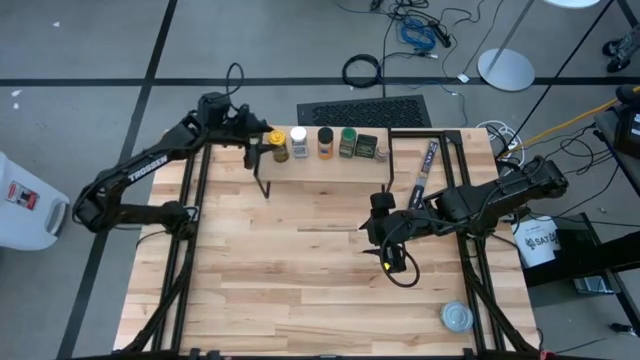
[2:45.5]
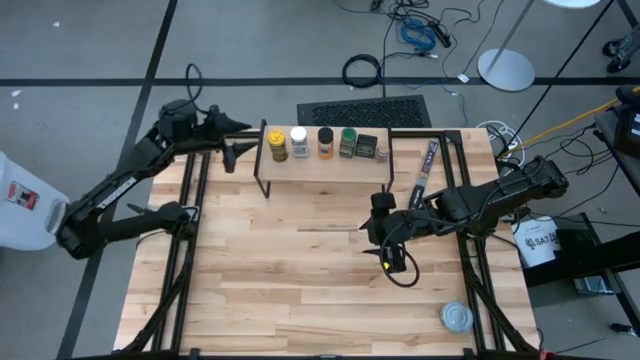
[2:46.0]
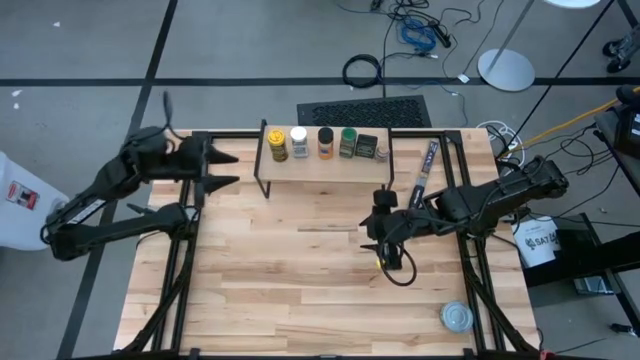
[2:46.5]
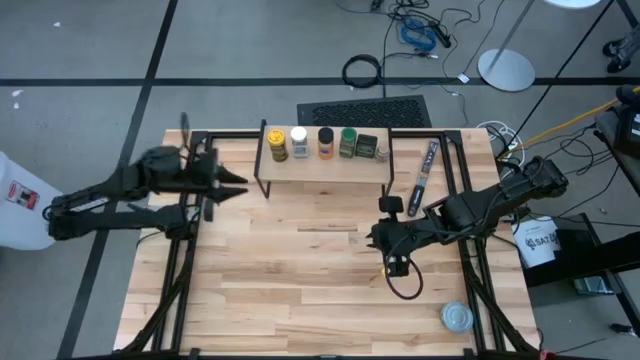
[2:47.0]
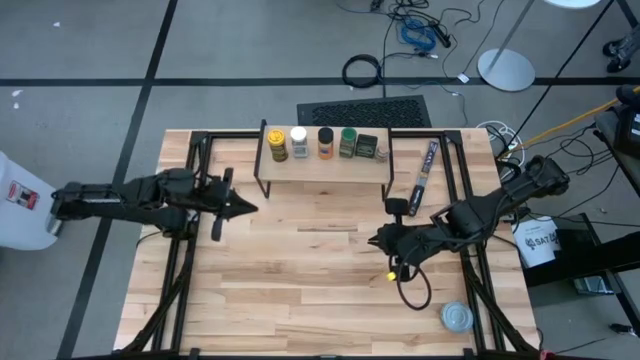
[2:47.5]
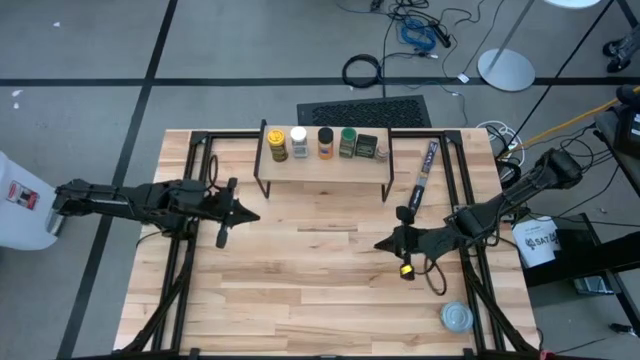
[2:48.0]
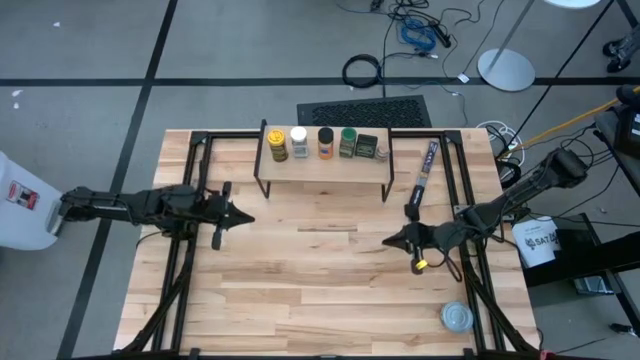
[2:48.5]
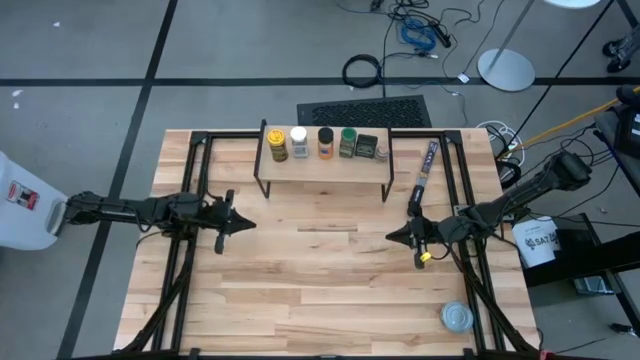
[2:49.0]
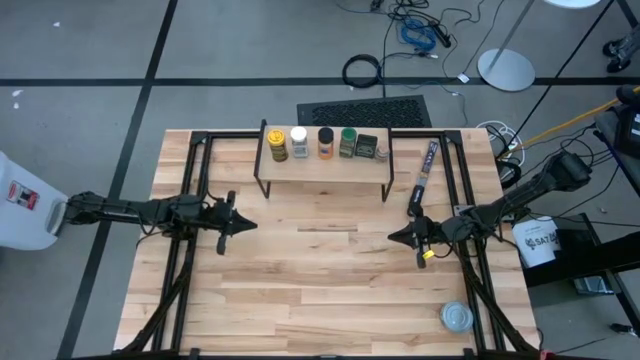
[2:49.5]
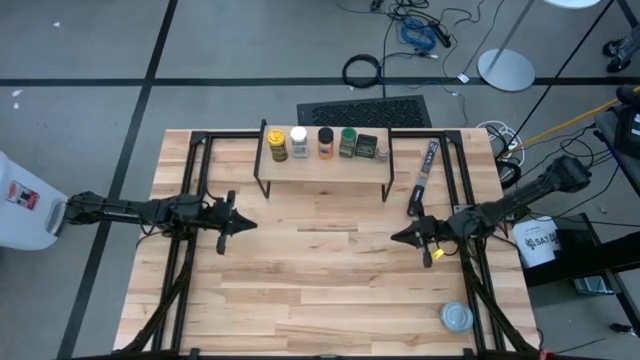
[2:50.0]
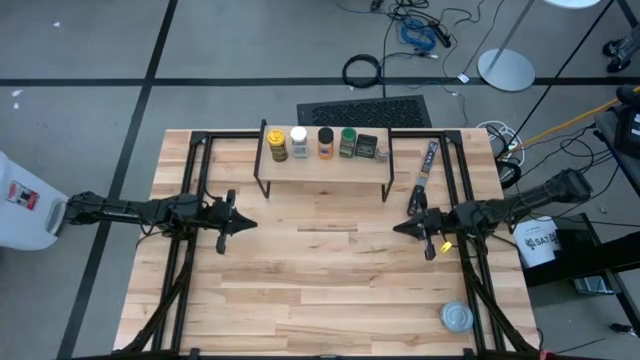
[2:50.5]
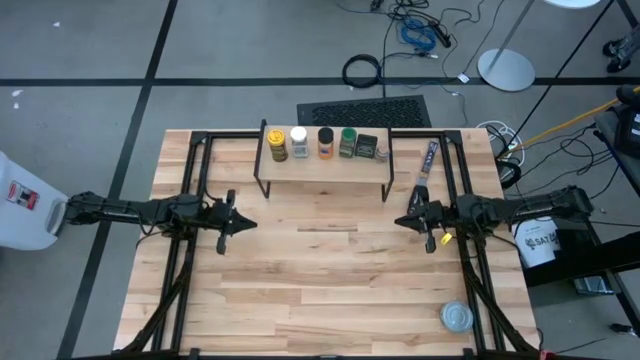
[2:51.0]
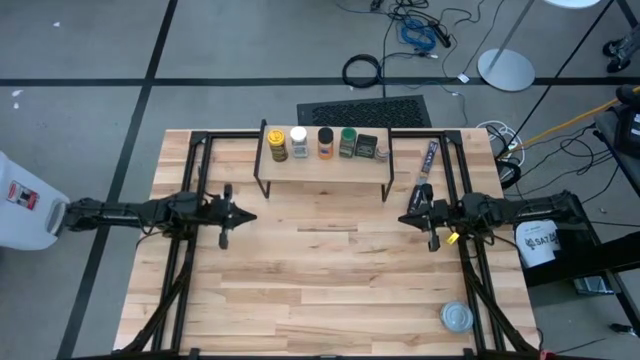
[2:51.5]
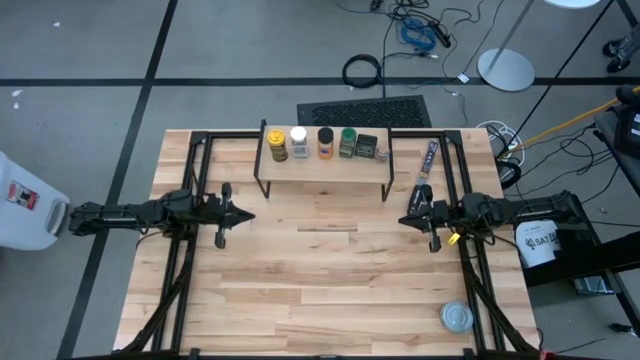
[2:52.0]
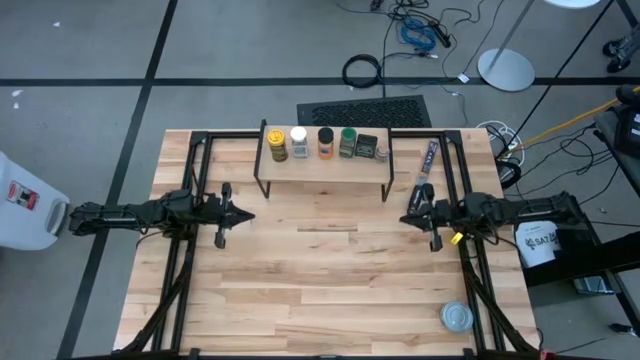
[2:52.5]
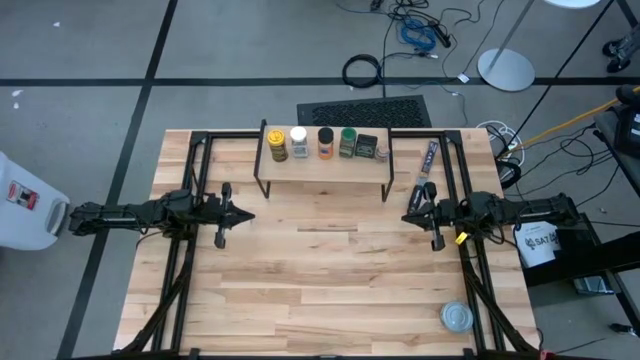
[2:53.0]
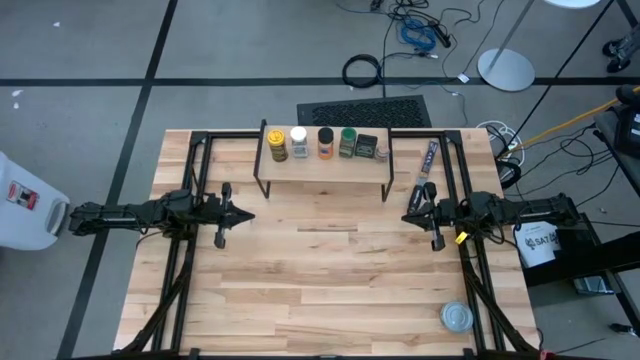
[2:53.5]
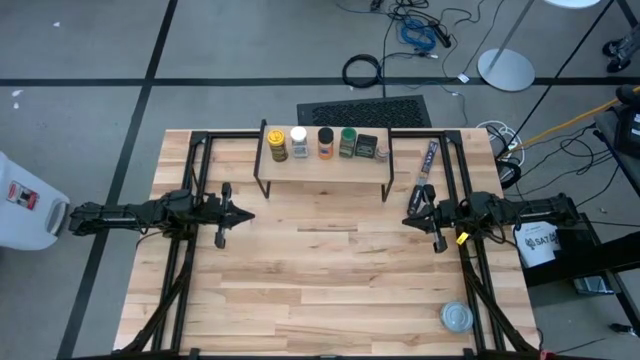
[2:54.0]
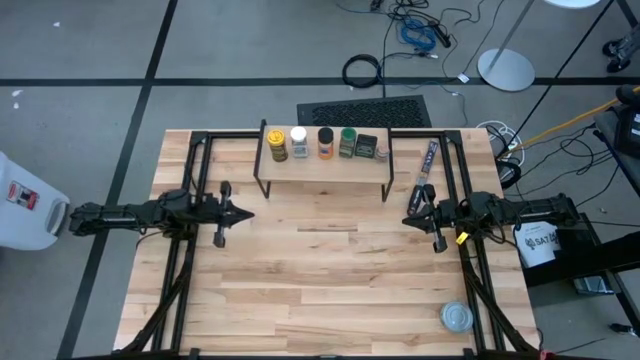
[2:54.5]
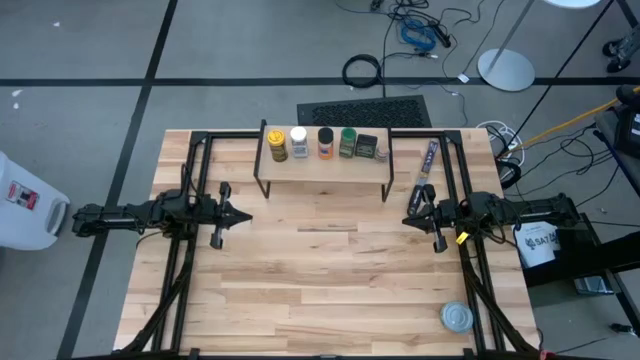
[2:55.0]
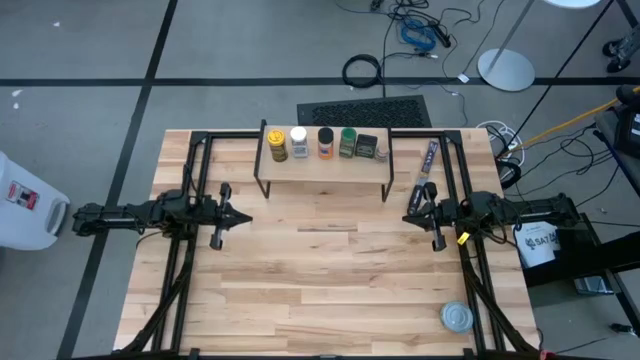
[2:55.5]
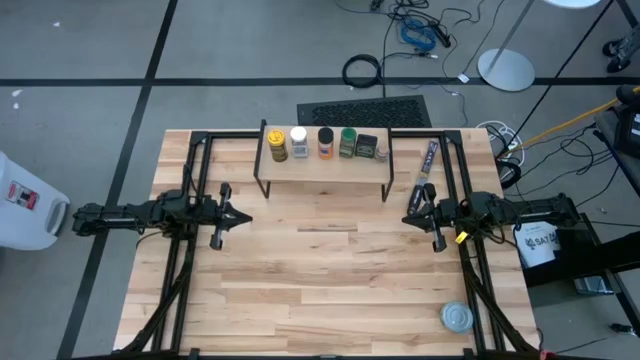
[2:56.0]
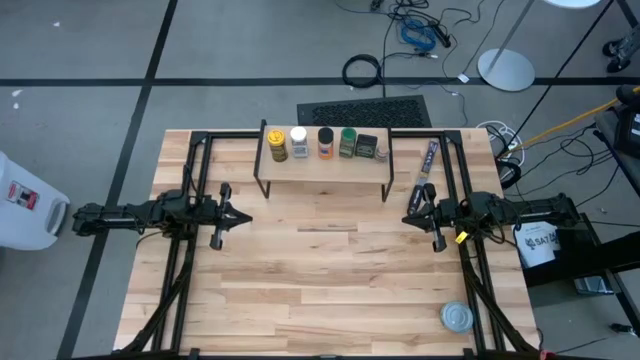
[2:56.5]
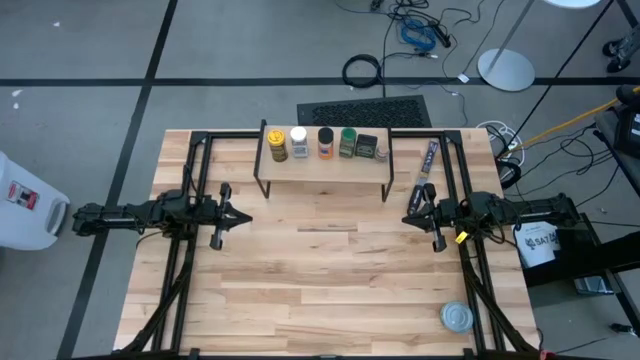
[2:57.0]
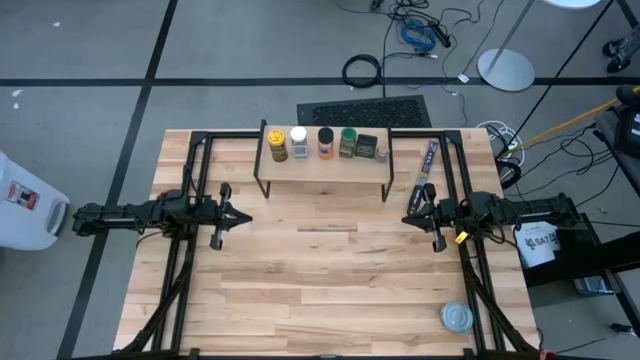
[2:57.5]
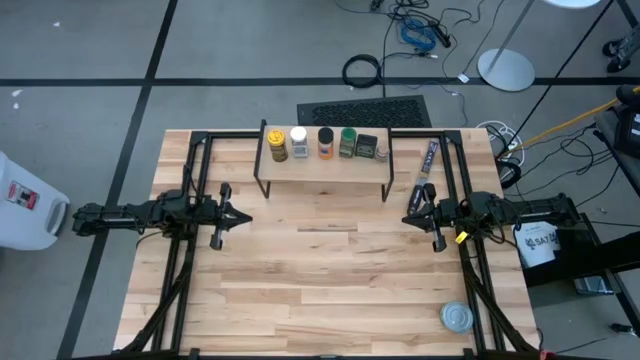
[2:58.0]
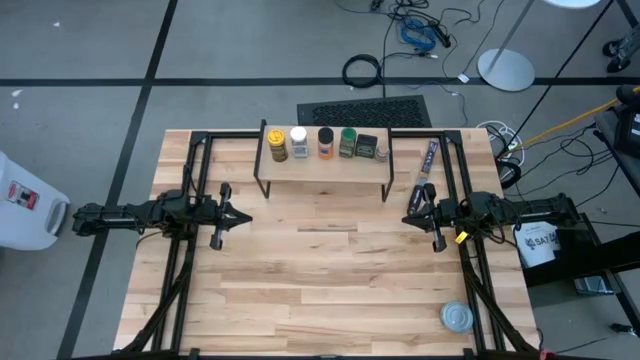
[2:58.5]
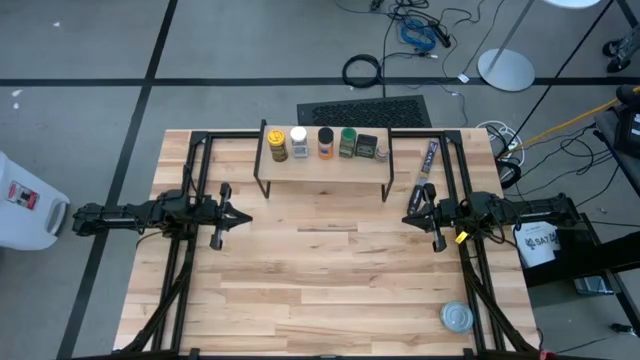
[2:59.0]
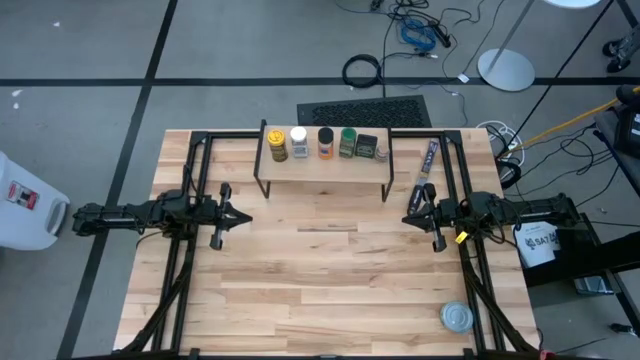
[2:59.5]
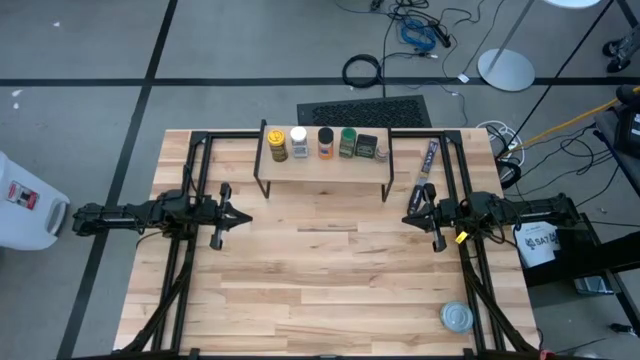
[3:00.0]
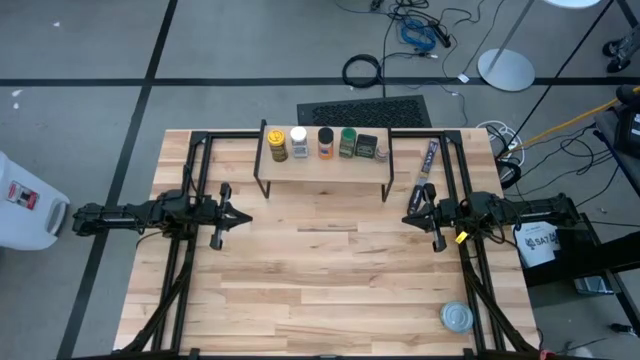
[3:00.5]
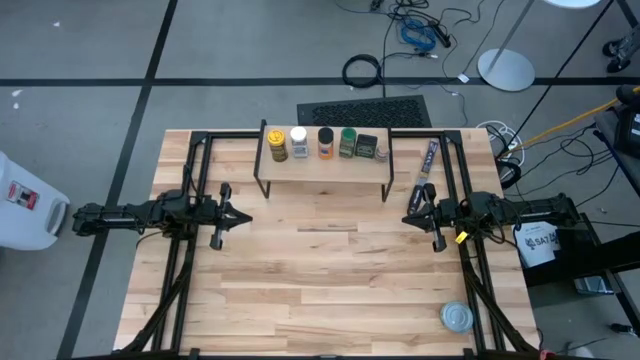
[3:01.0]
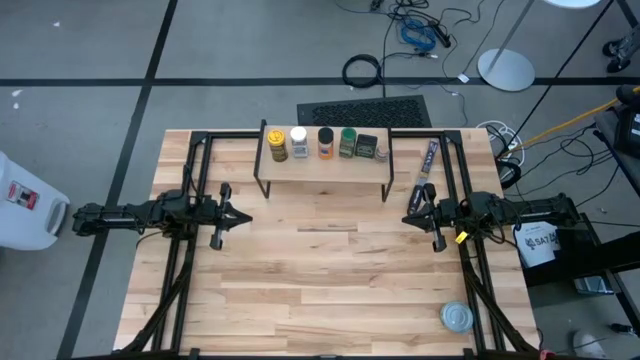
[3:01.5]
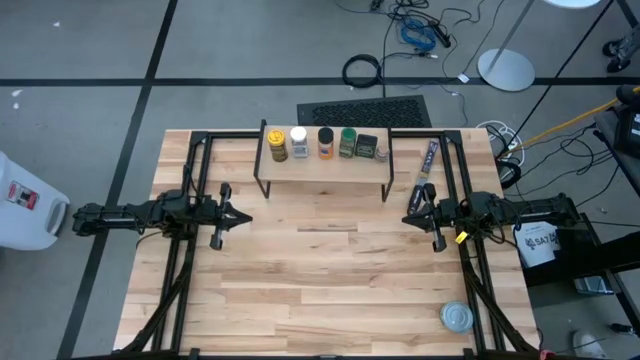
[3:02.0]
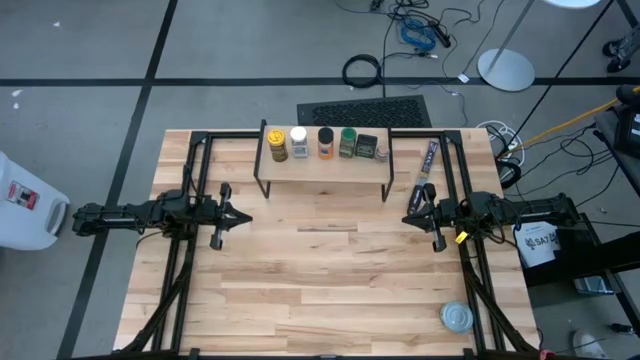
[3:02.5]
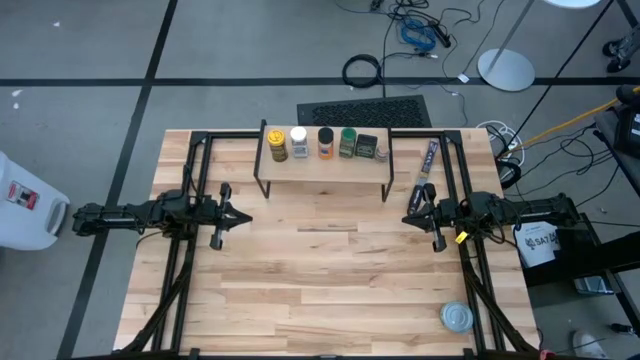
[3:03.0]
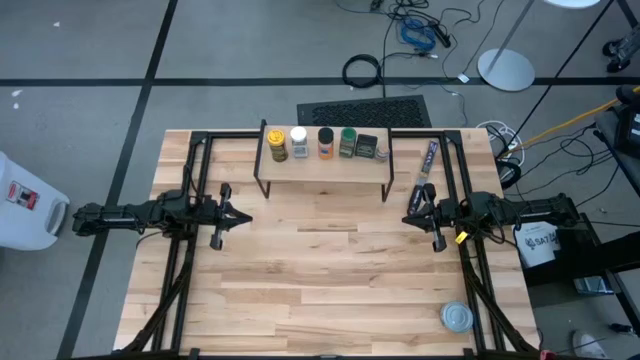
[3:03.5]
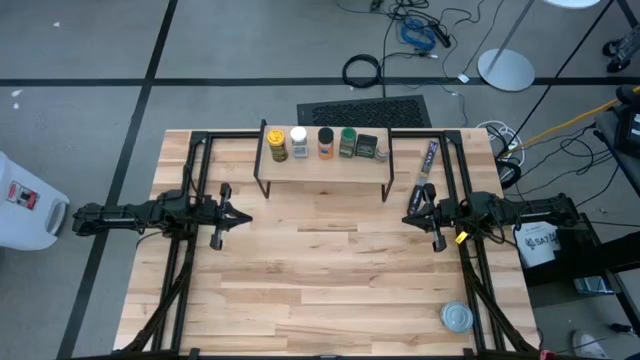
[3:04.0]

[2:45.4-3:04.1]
Task: Shelf spices
Return to Home Position

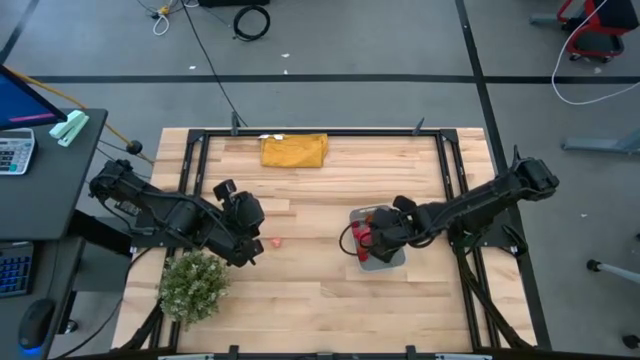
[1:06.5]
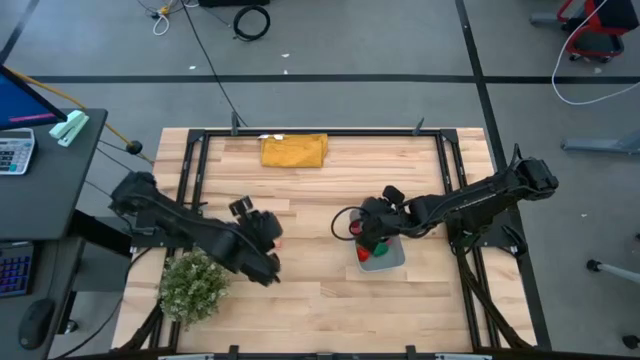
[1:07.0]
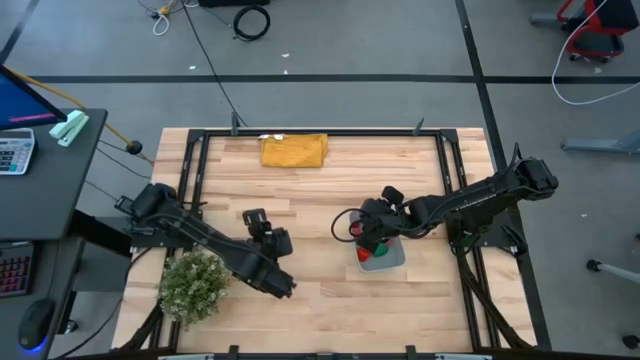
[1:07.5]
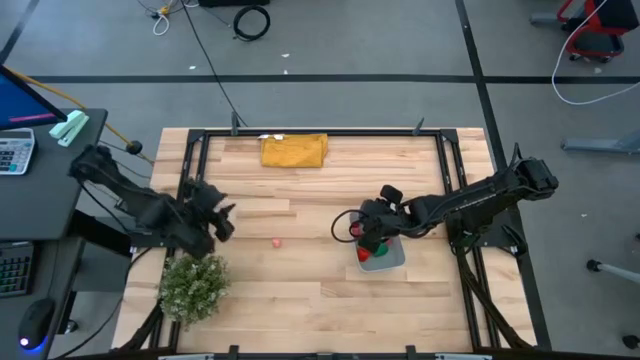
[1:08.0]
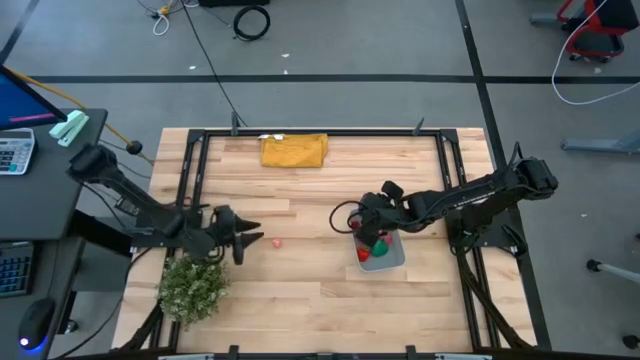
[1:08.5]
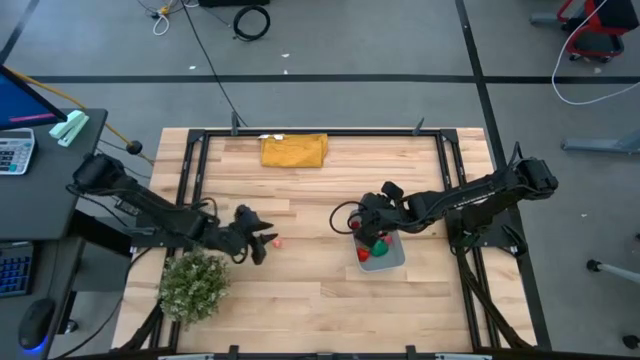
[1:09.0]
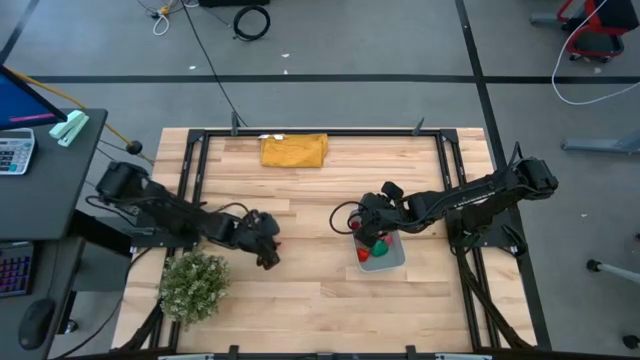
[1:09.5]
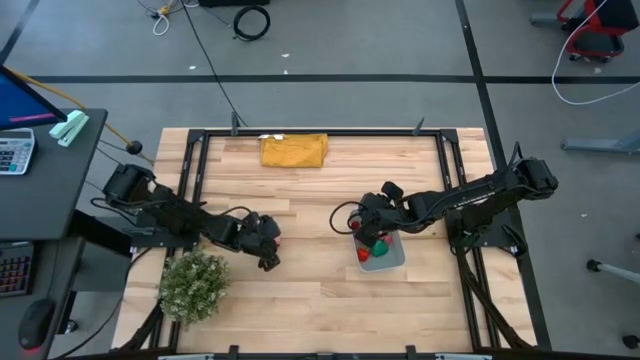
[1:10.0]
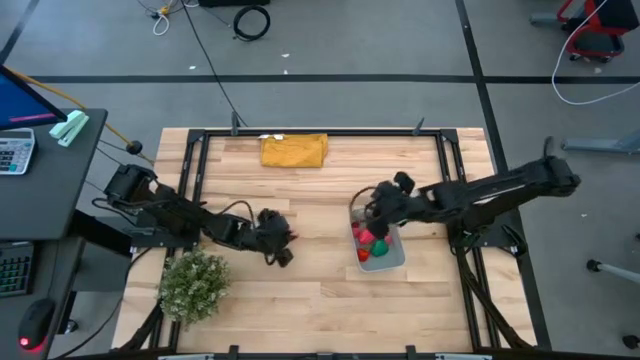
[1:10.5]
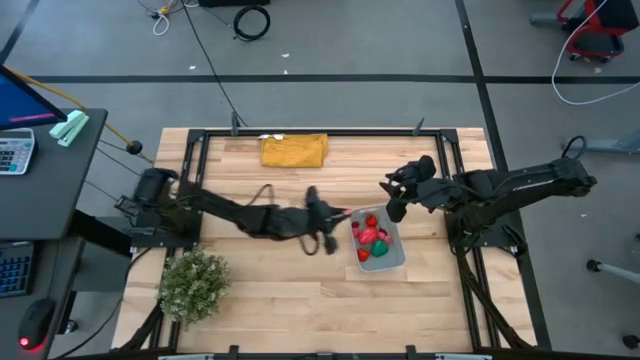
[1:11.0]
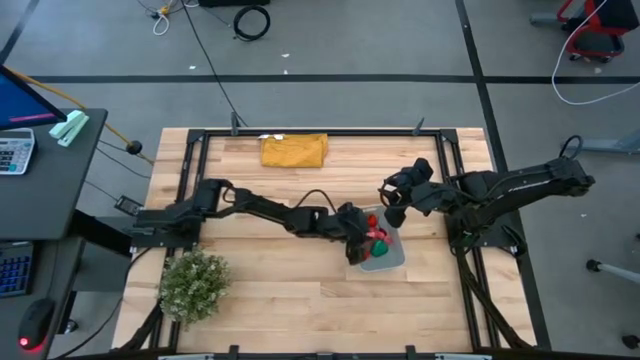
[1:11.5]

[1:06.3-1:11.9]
Task: Pick and placing Produce into tupperware
Put the pink peach into the gray bin
